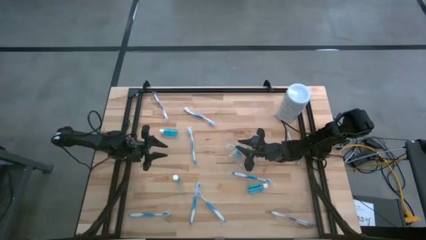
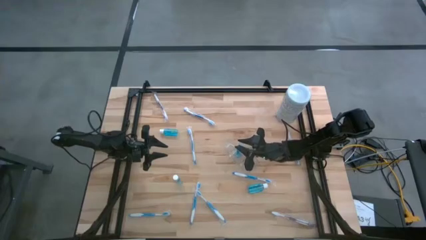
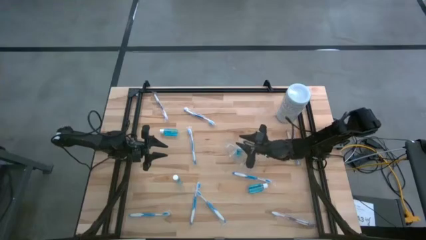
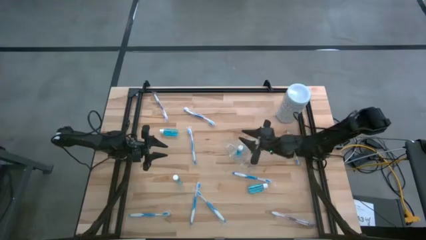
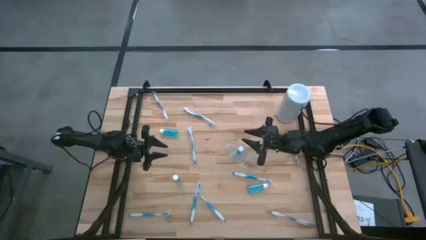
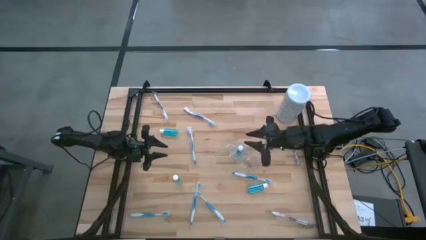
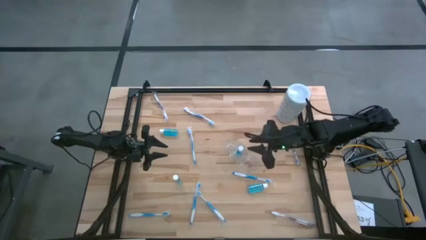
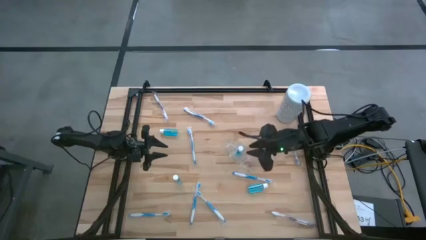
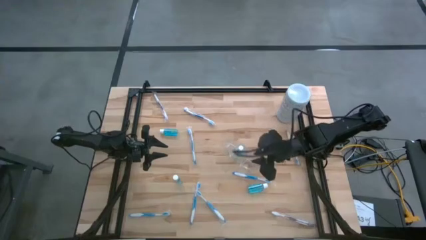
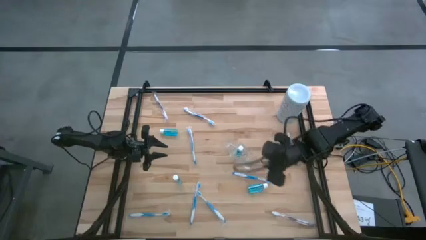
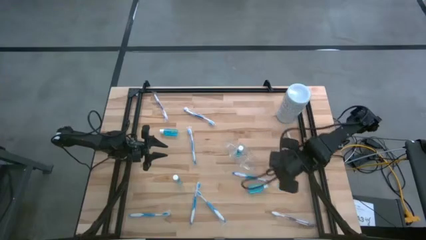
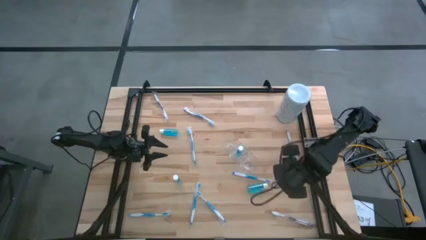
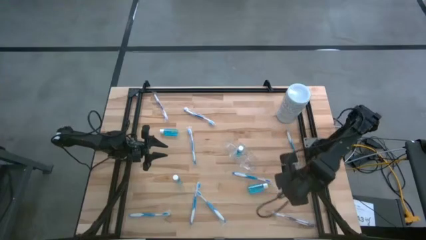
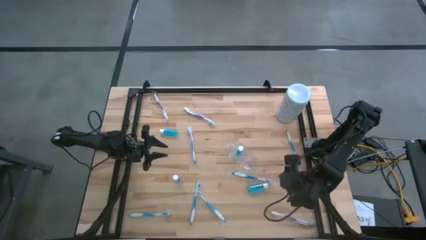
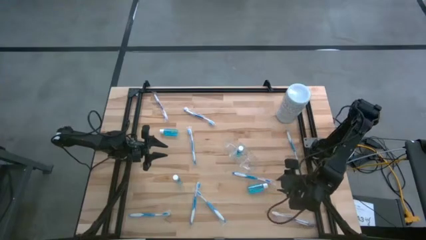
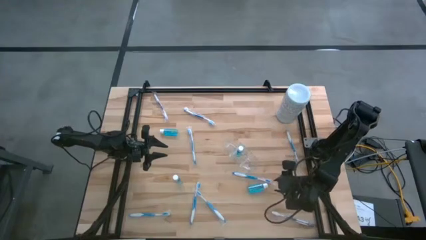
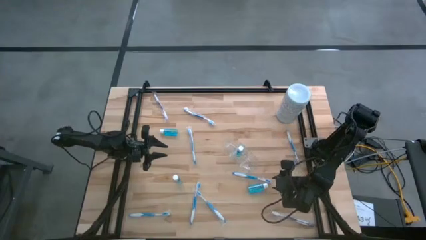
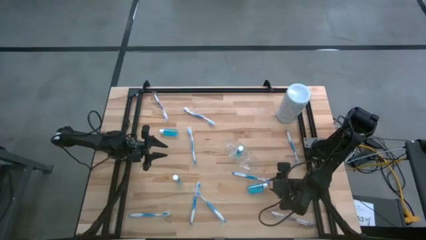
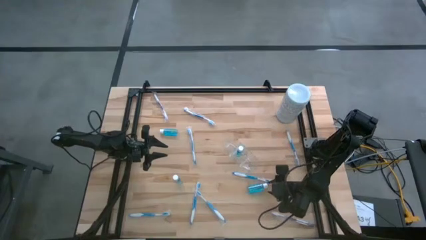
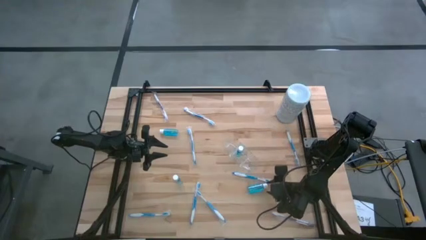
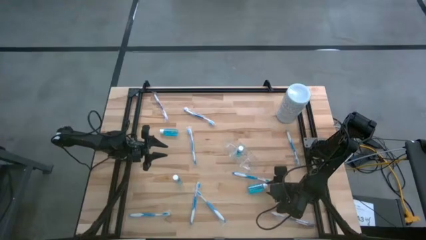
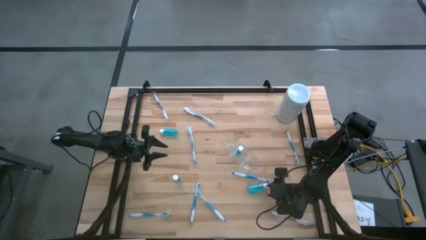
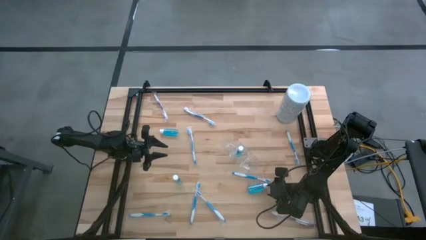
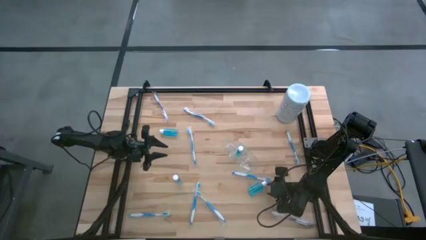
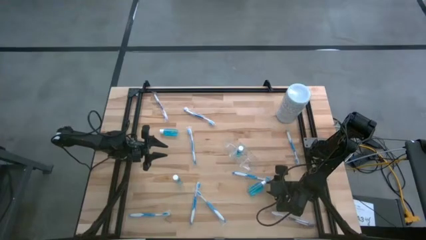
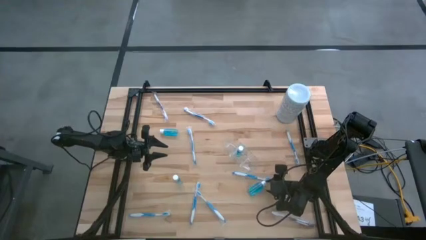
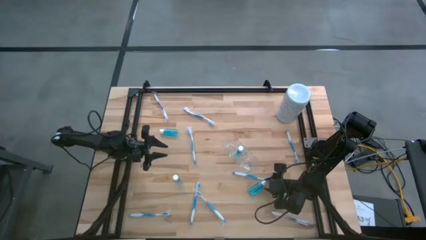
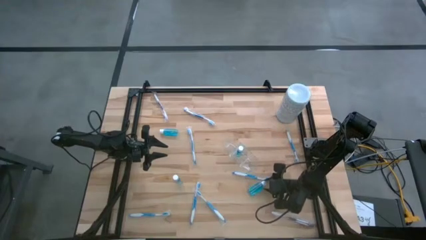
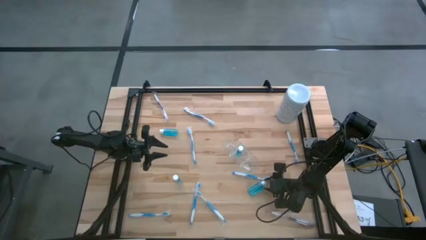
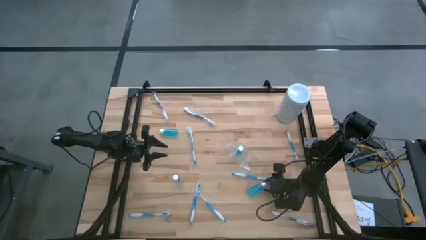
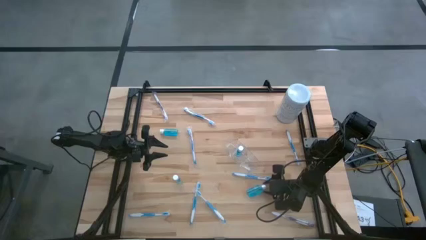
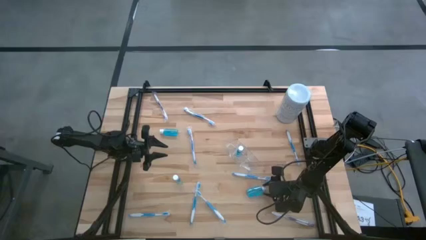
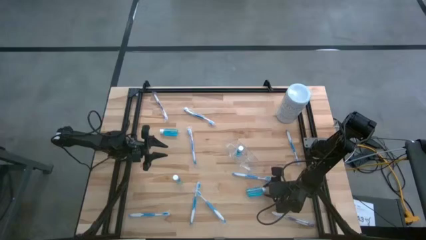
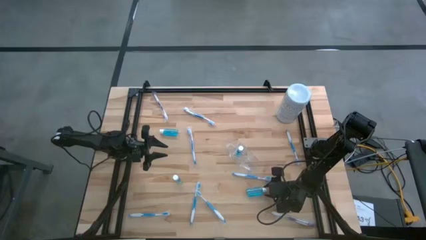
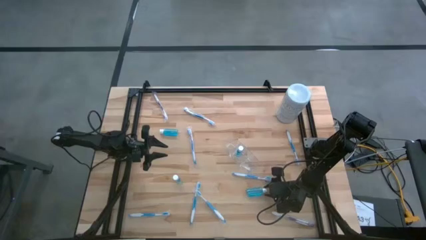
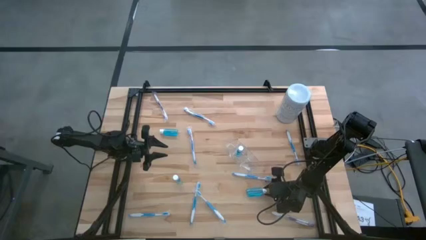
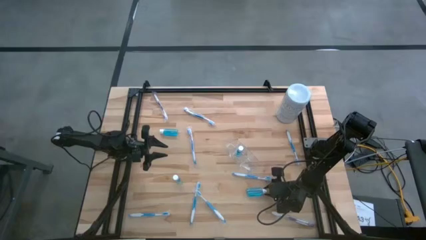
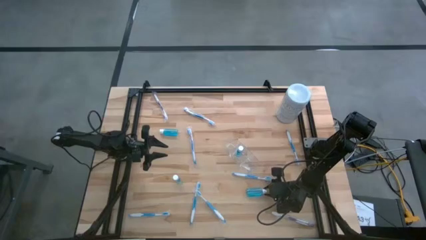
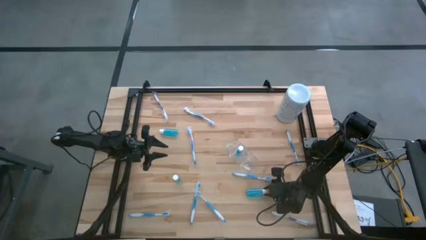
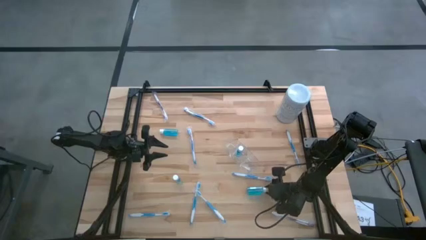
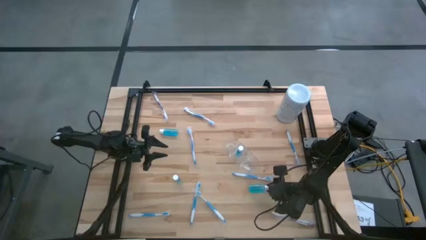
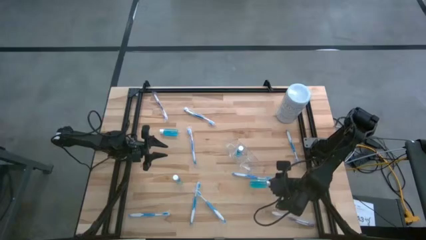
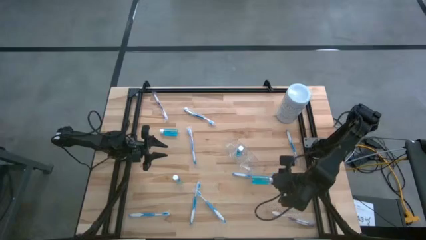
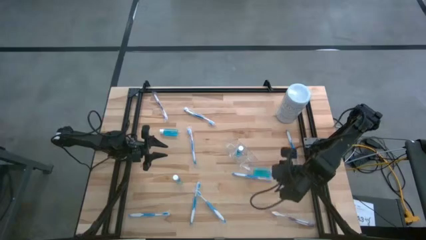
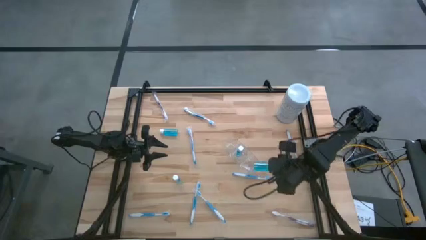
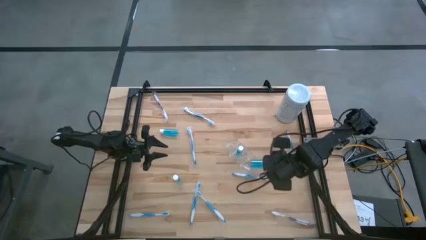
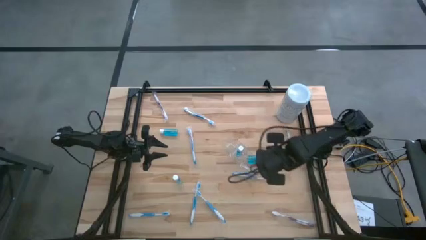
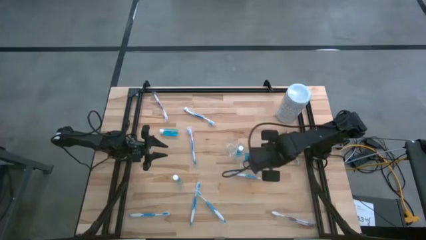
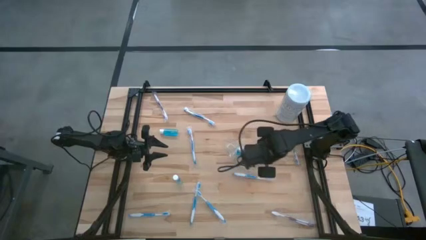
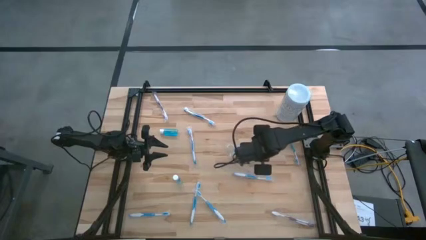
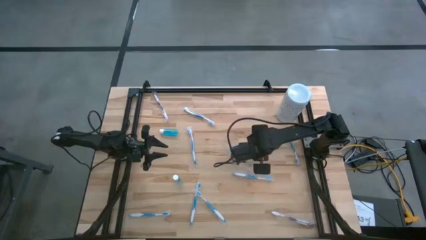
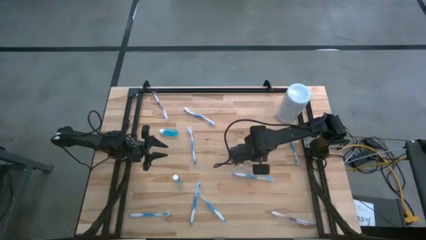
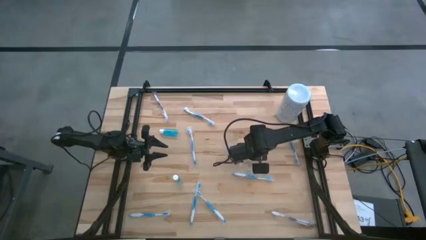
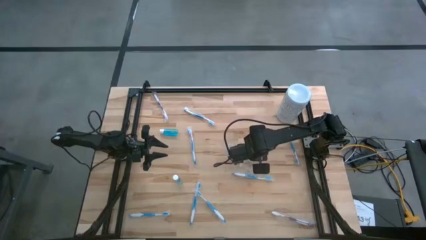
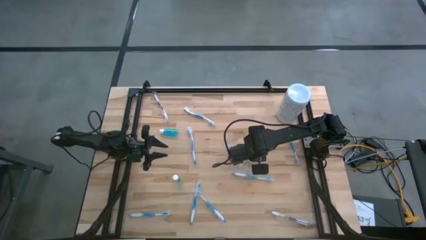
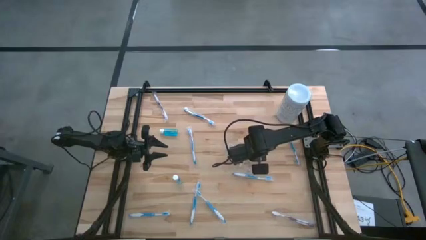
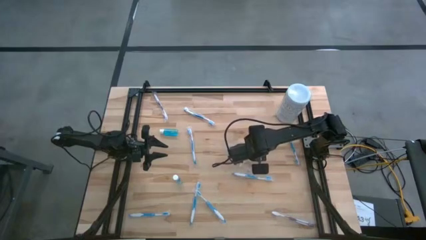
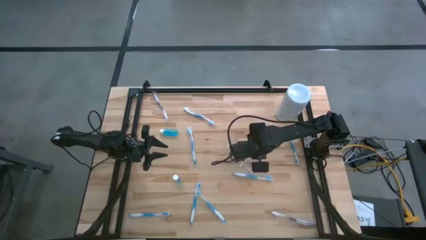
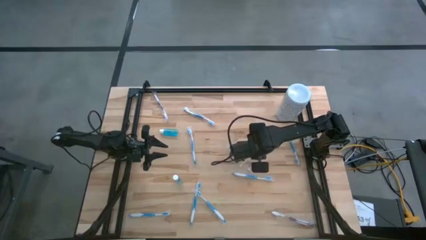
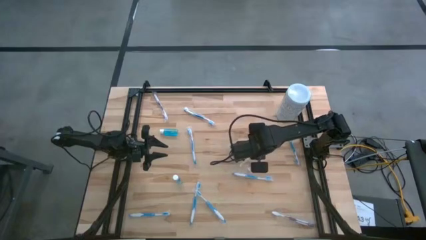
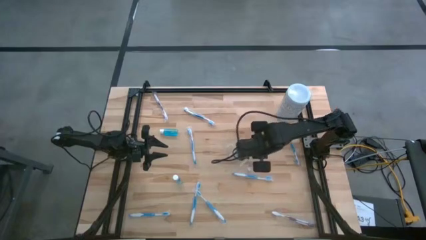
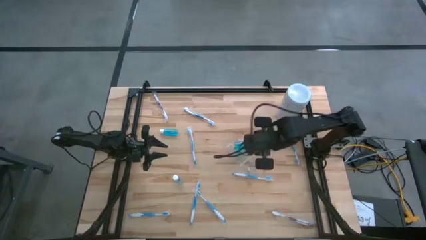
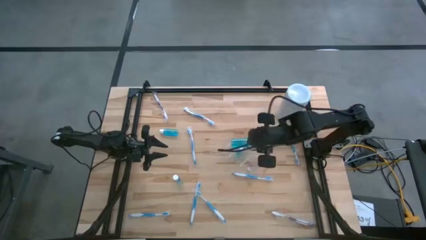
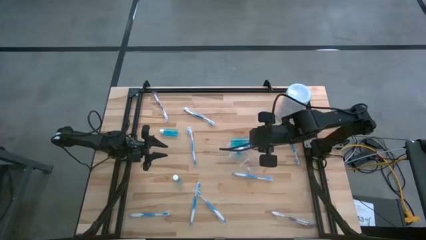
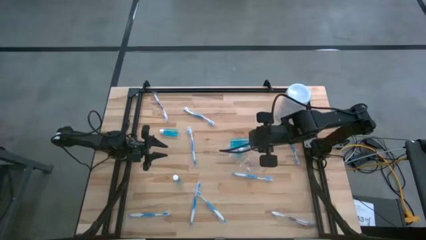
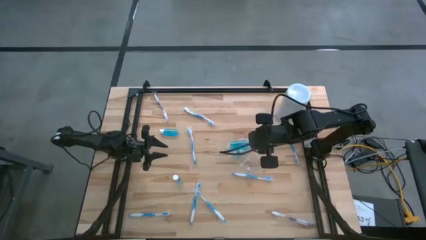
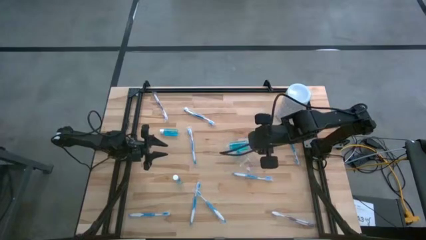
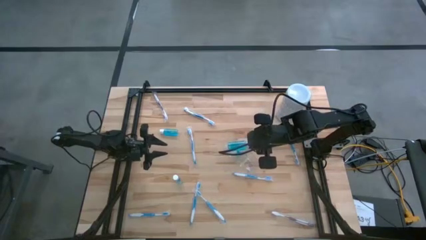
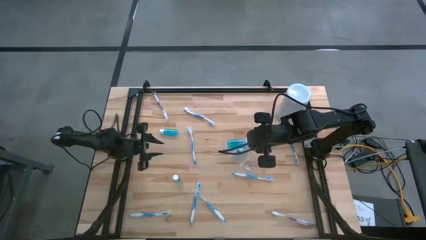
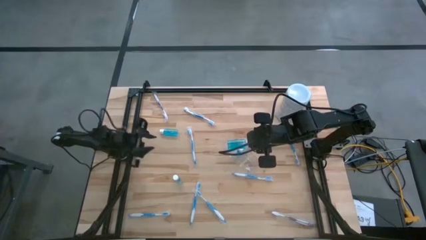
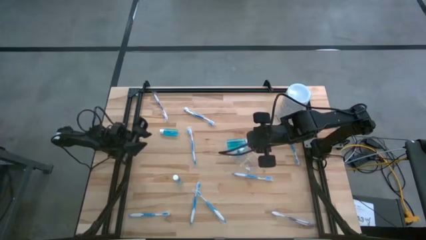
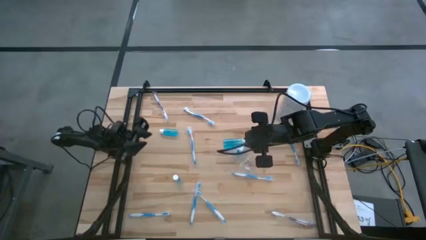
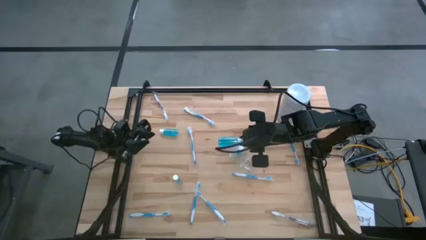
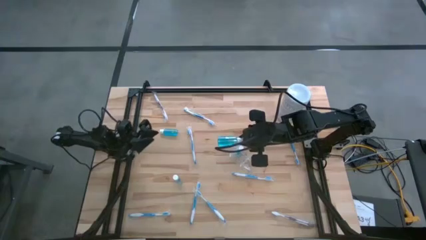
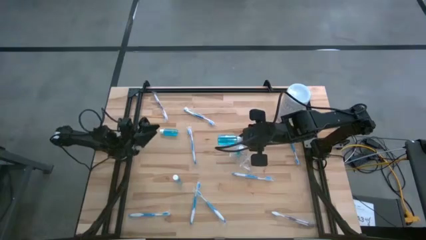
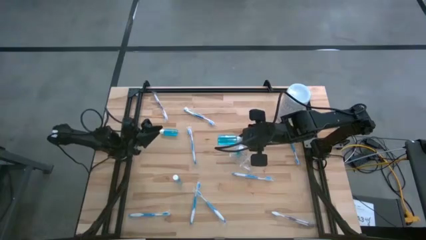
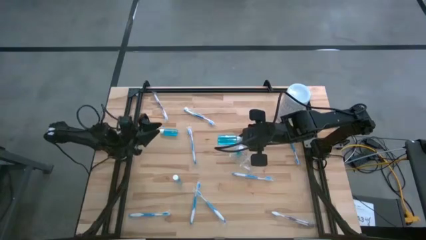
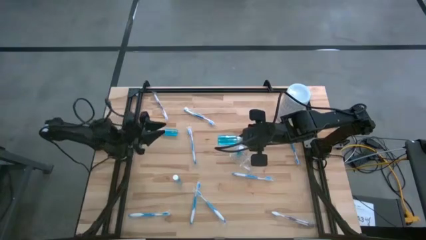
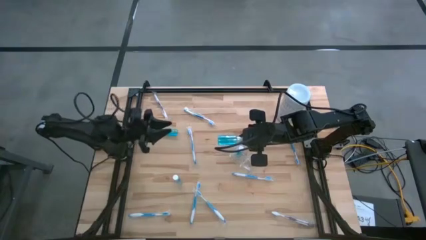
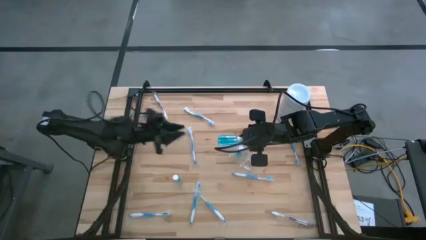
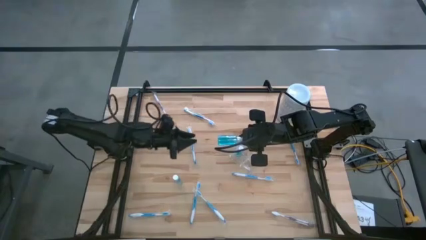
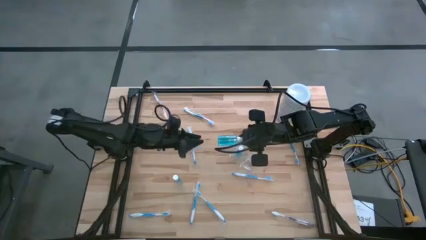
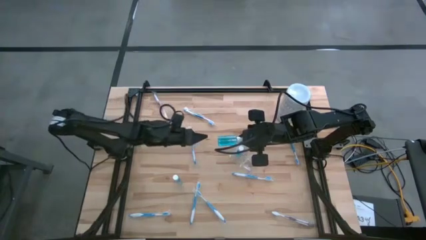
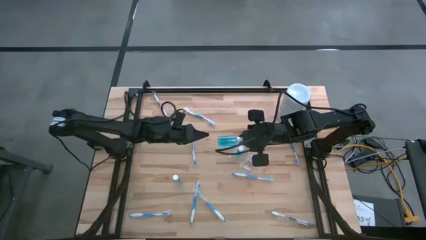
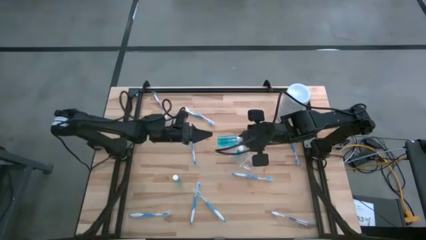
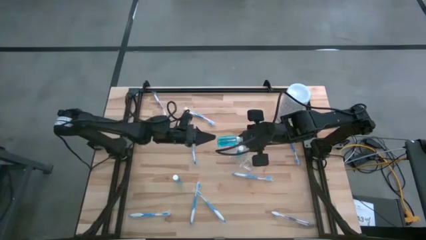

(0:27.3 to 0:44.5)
Task: Pick & Place toothbrushing station
Put the blue mouthwash into the middle section of the transparent organizer
